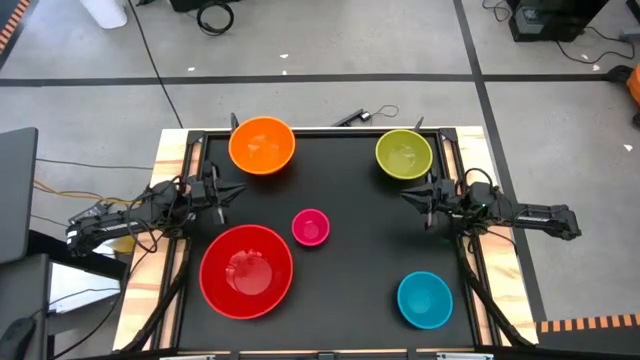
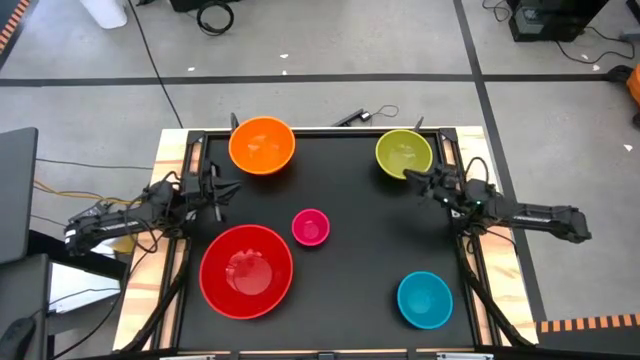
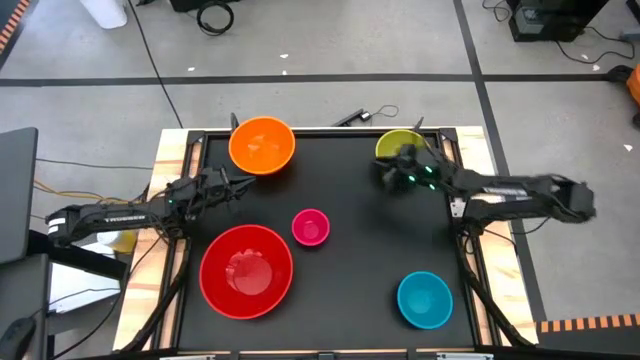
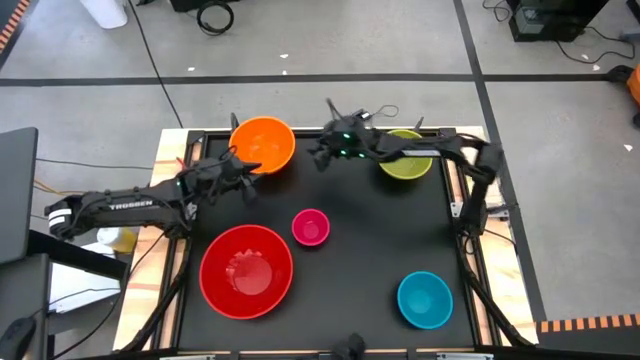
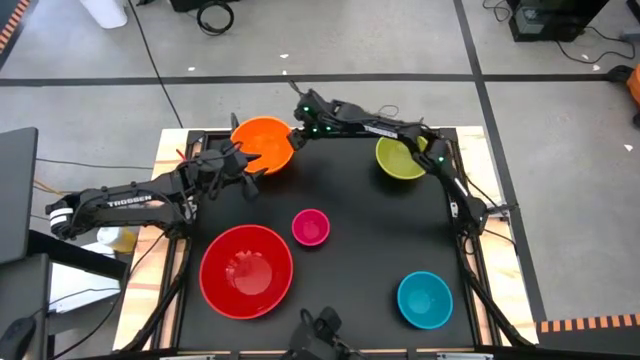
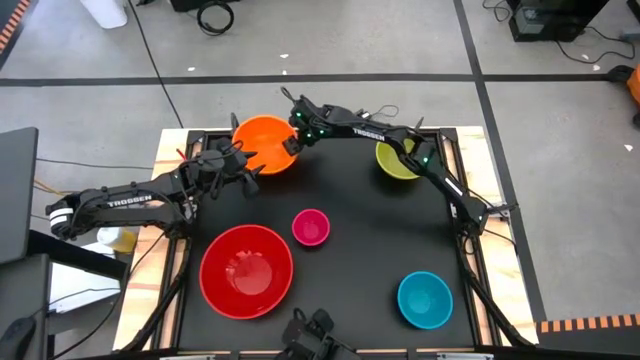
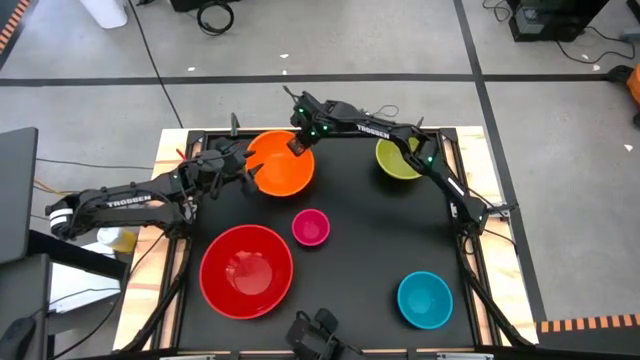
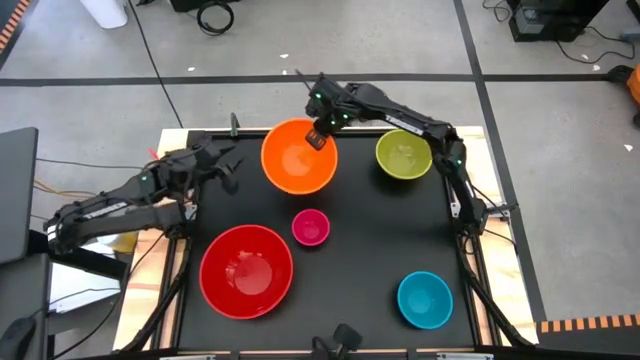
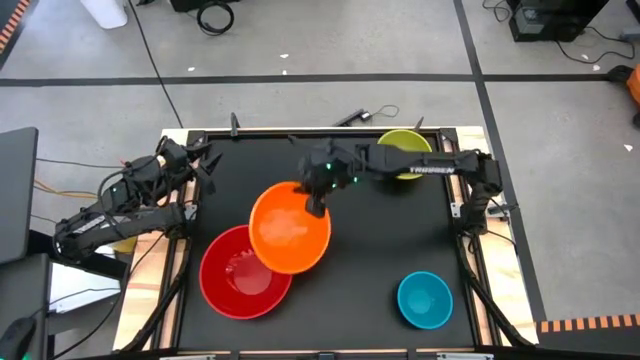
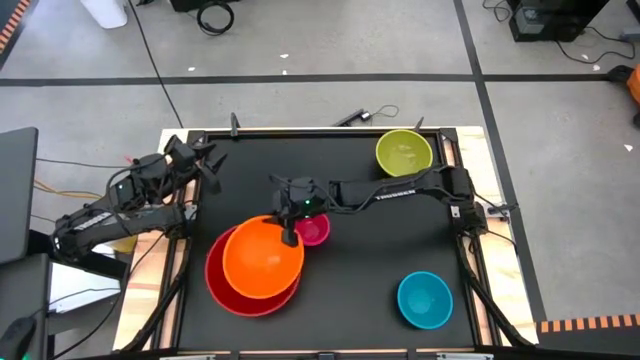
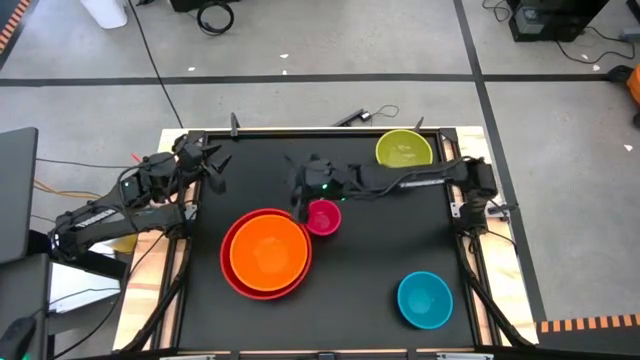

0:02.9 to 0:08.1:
Stack the orange bowl on top of the red bowl

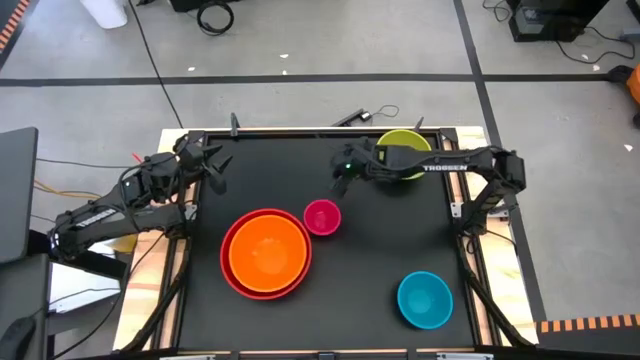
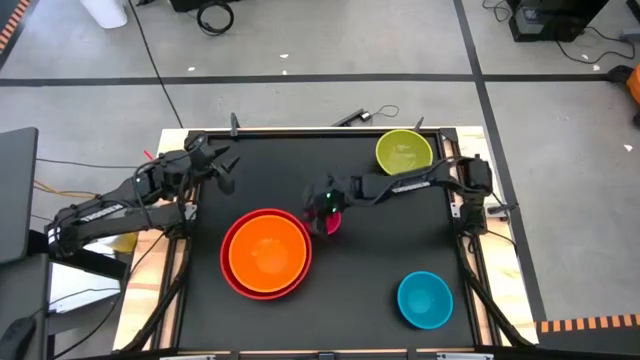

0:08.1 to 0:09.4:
Adjust the stacked bowls

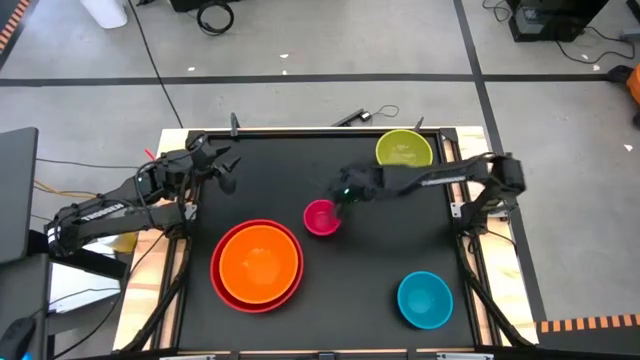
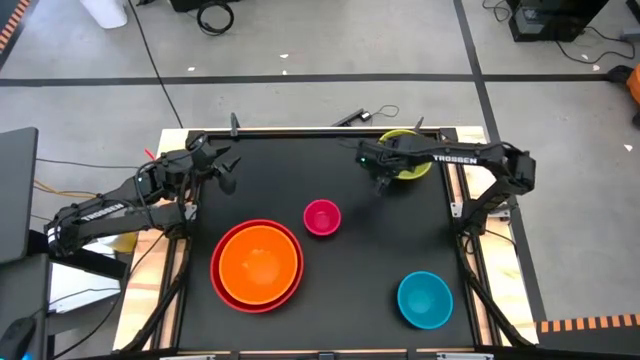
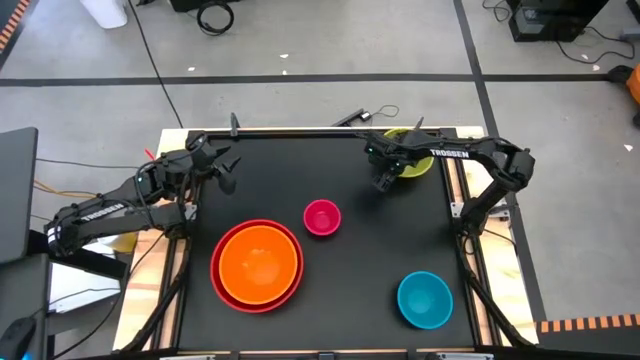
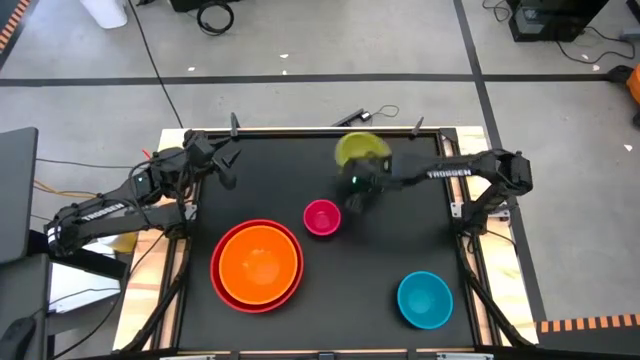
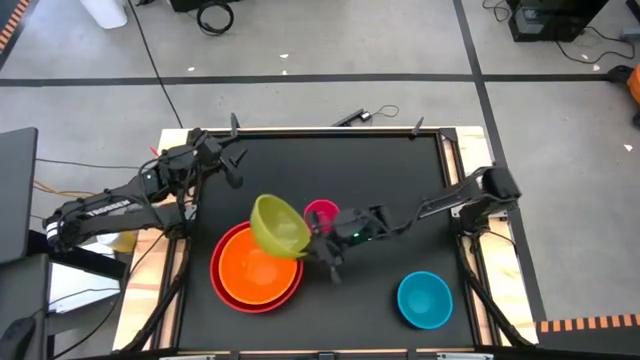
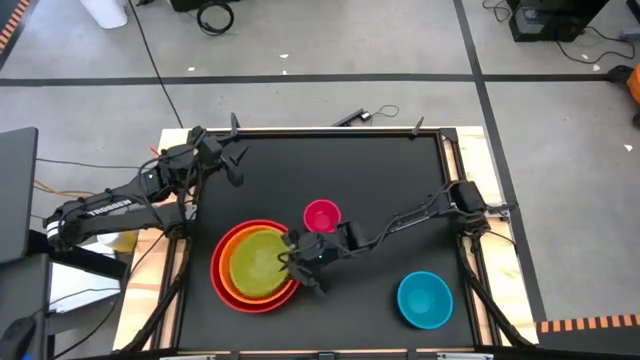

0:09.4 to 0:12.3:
Stack the green bowl on top of the orange bowl

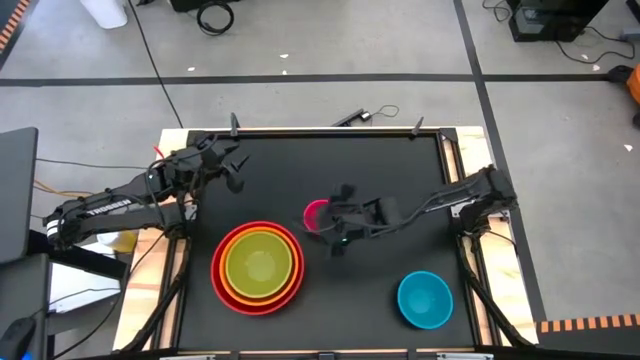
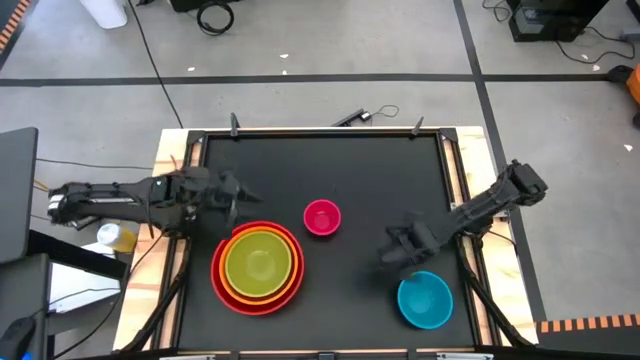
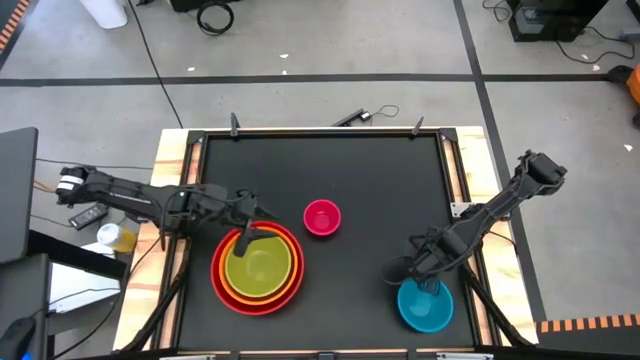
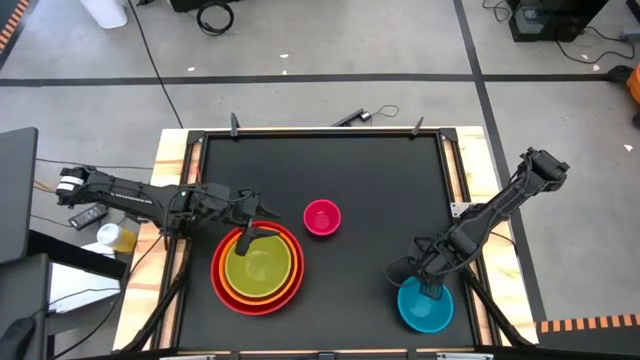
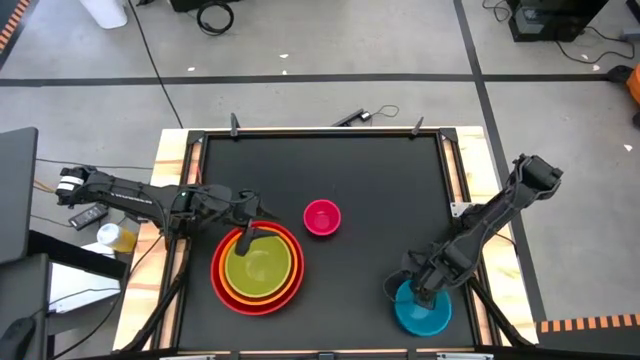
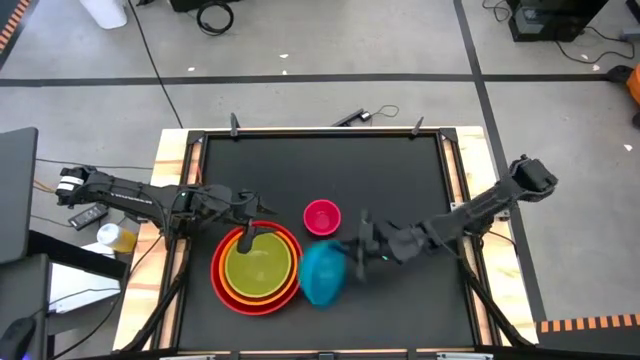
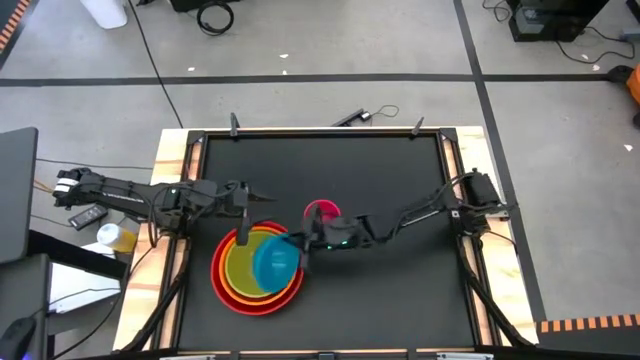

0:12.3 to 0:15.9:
Stack the blue bowl on top of the green bowl

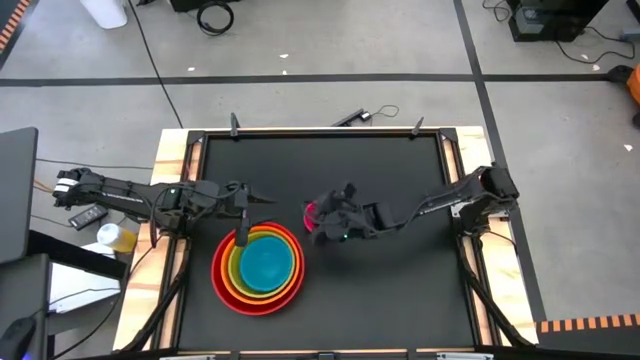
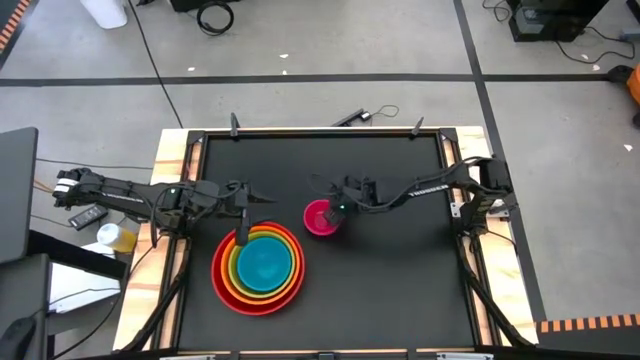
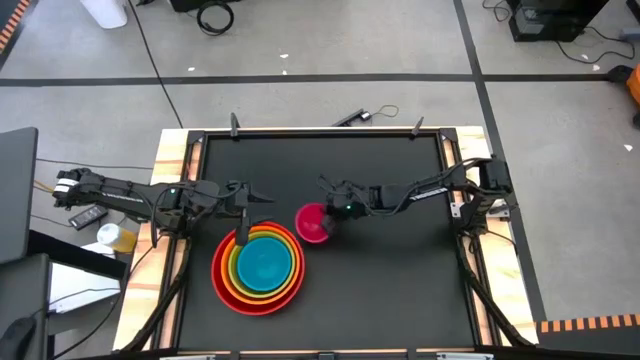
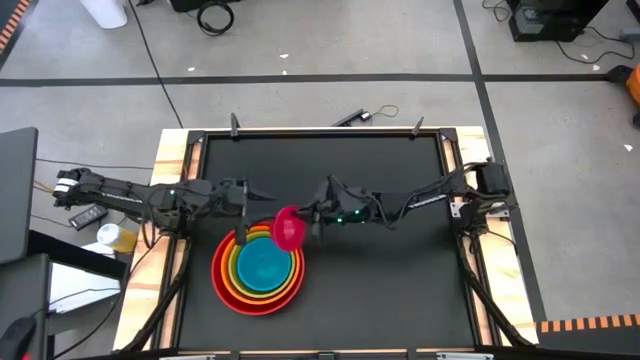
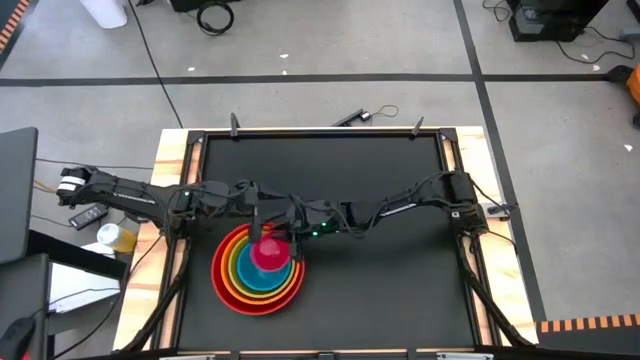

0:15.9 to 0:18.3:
Stack the pink bowl on top of the blue bowl

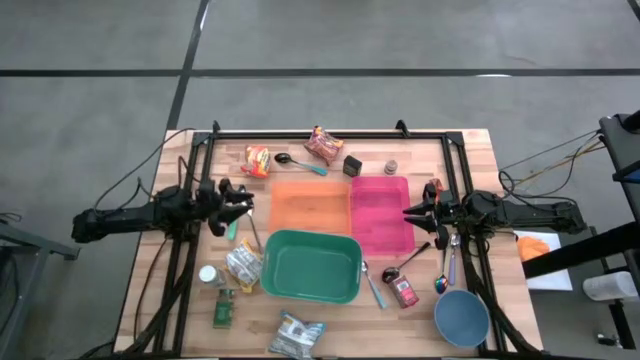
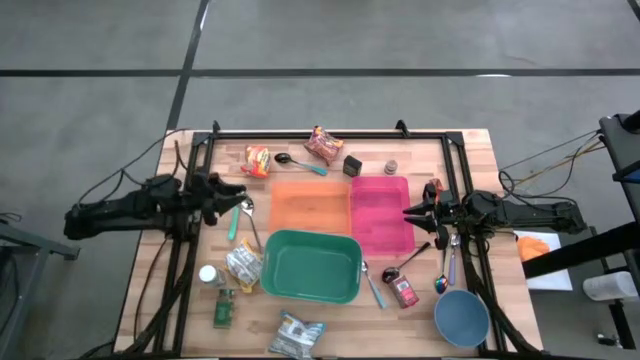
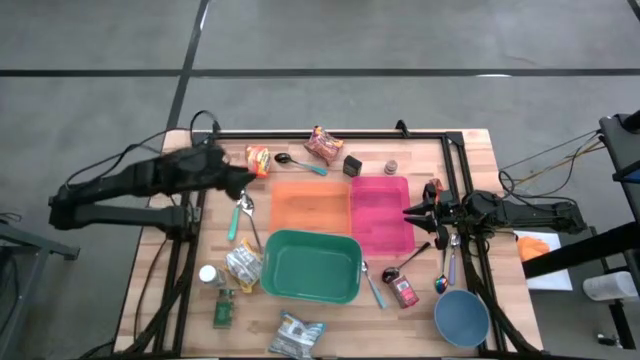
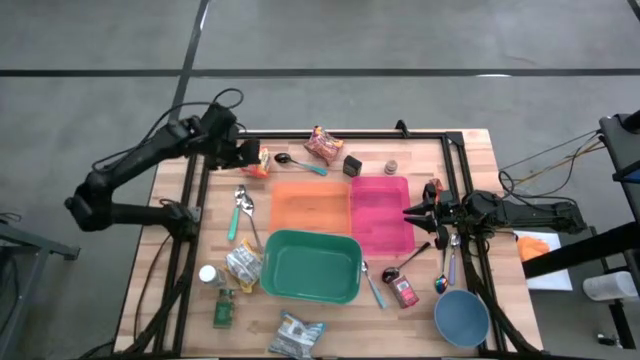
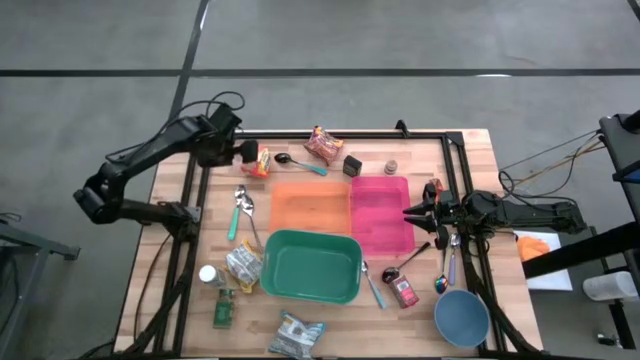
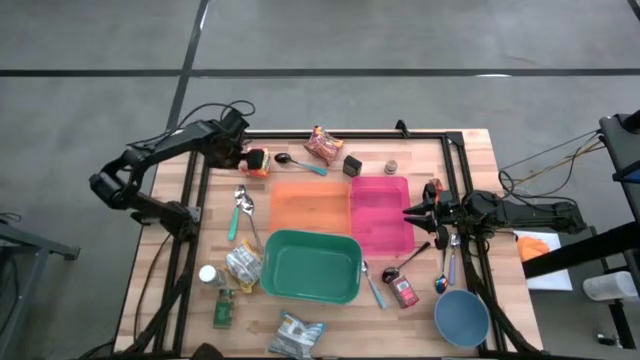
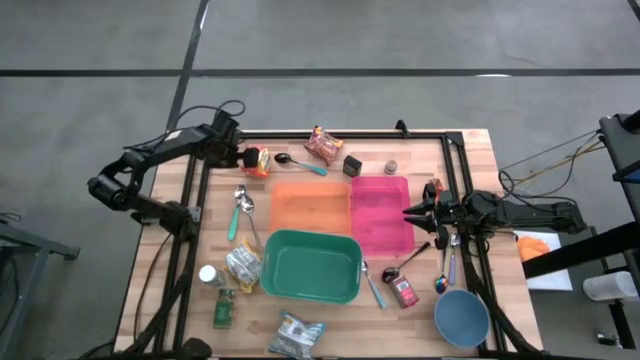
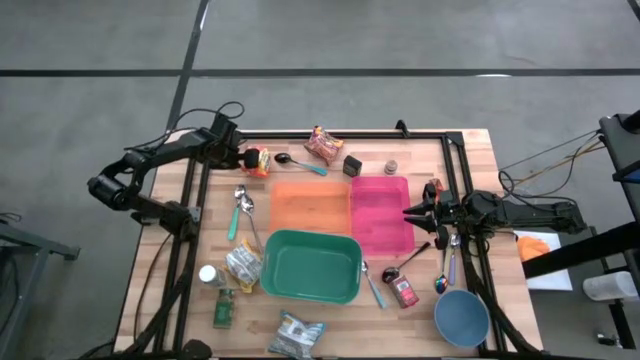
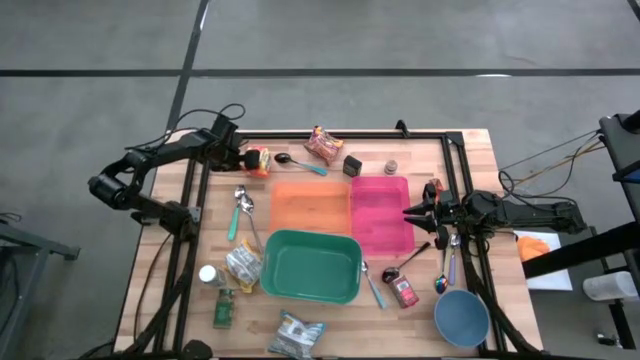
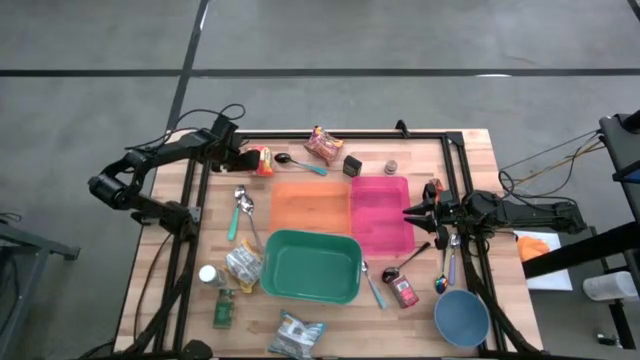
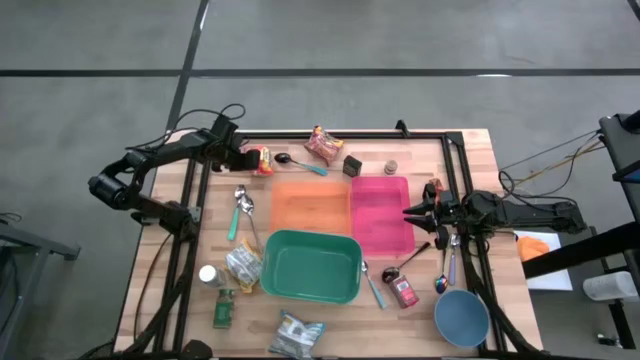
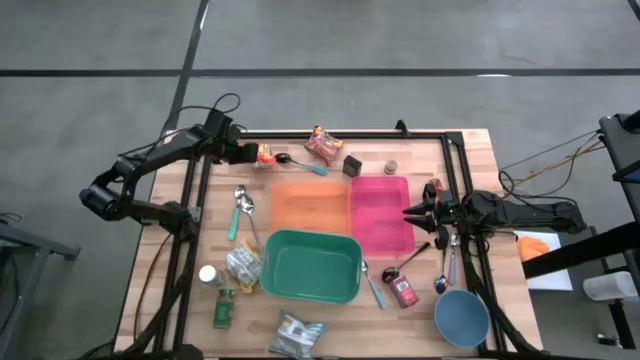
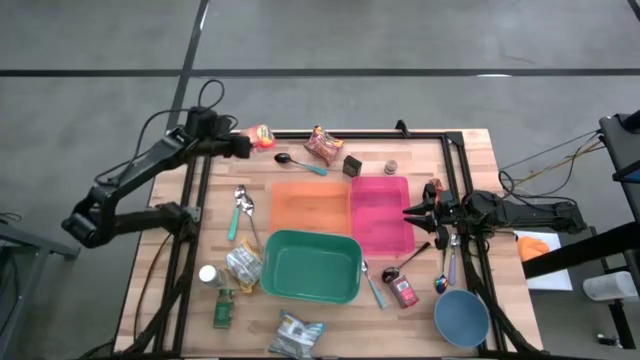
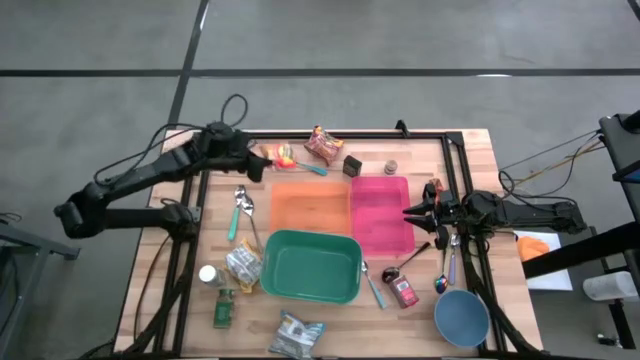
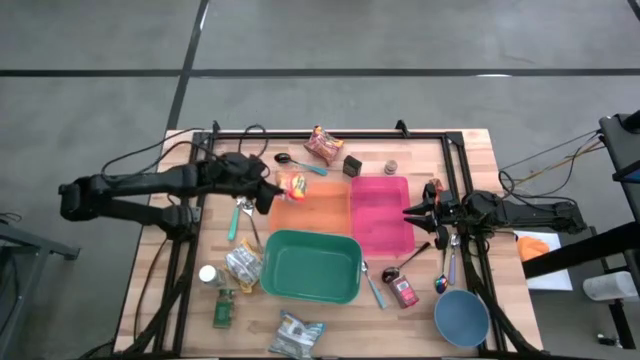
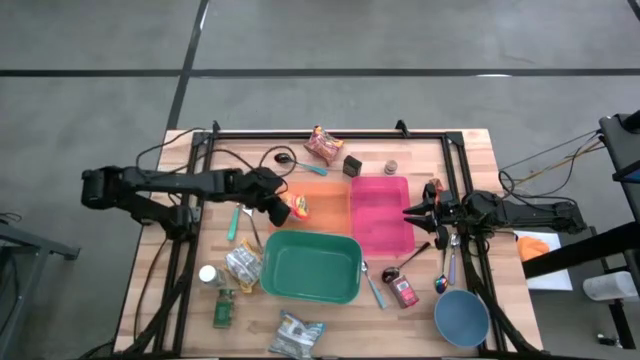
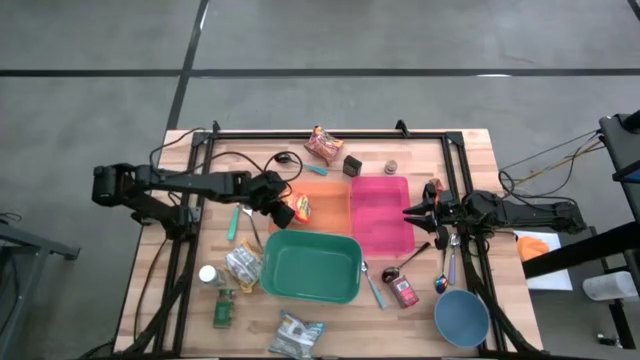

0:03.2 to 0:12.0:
Put the orange noodle pack into the orange bin
